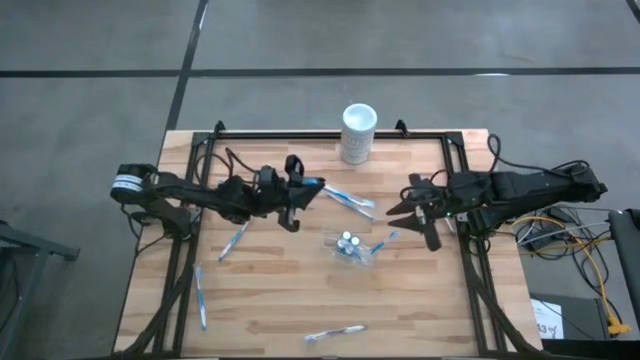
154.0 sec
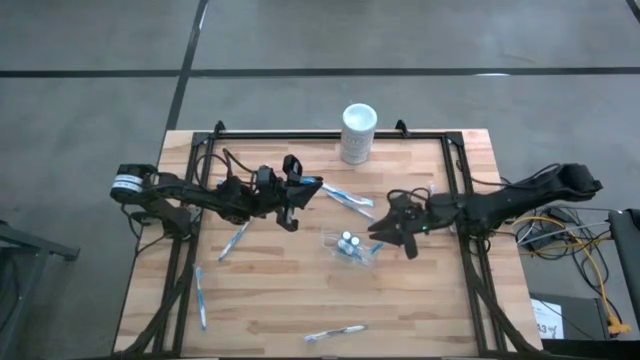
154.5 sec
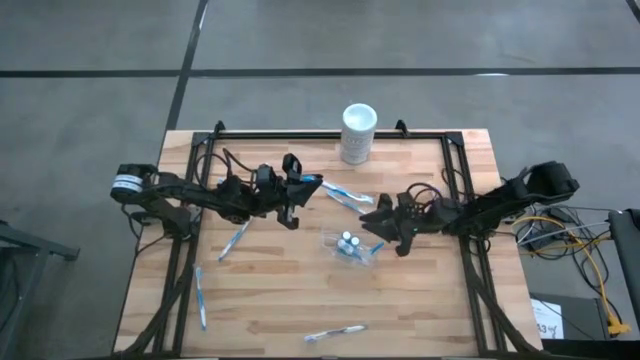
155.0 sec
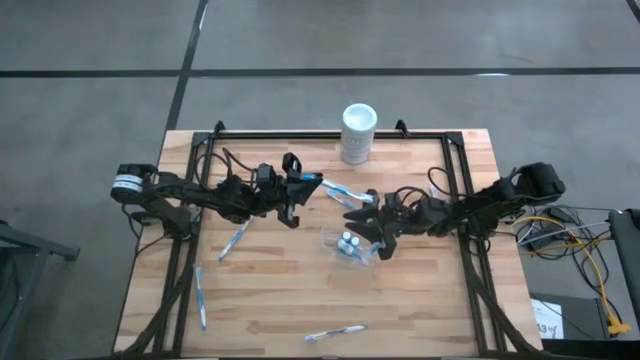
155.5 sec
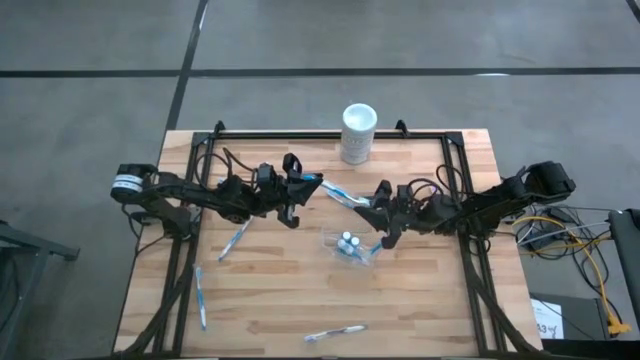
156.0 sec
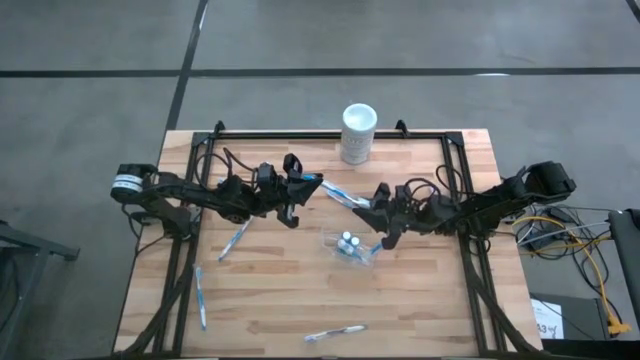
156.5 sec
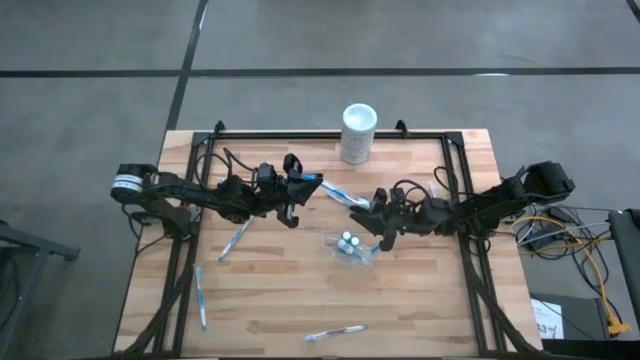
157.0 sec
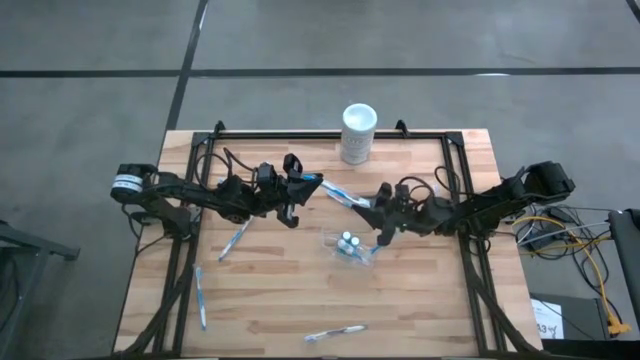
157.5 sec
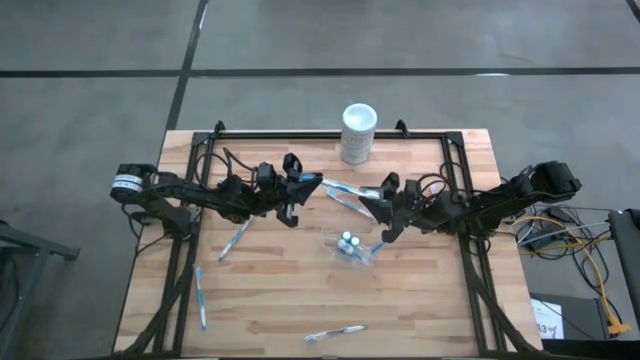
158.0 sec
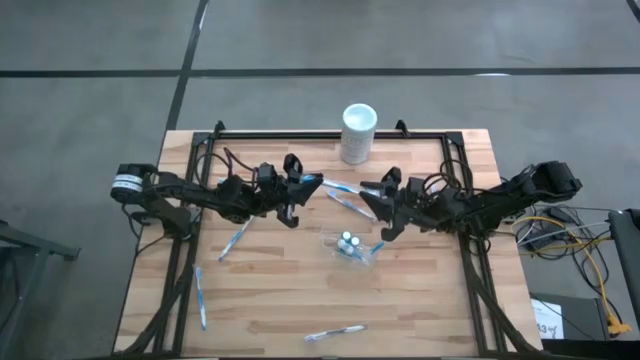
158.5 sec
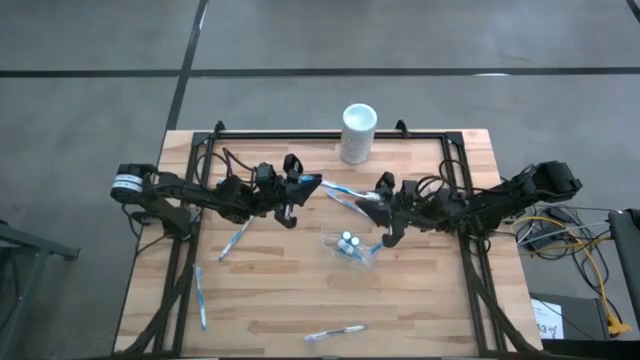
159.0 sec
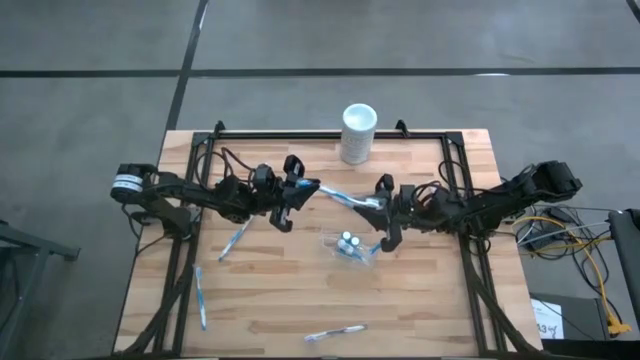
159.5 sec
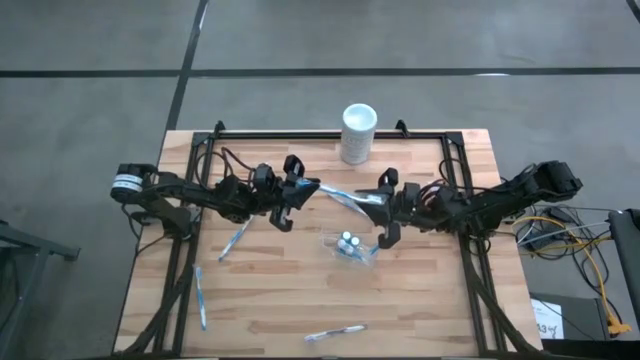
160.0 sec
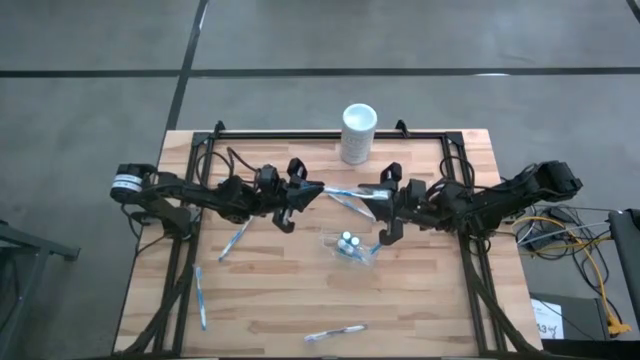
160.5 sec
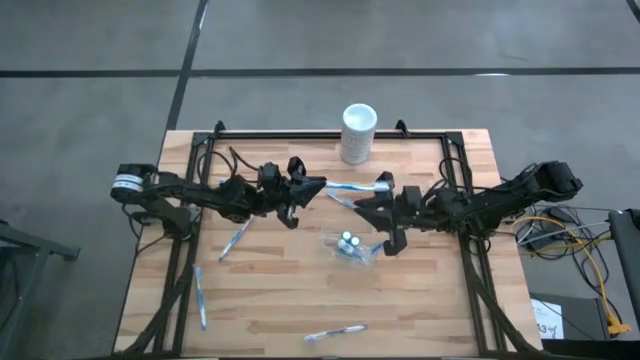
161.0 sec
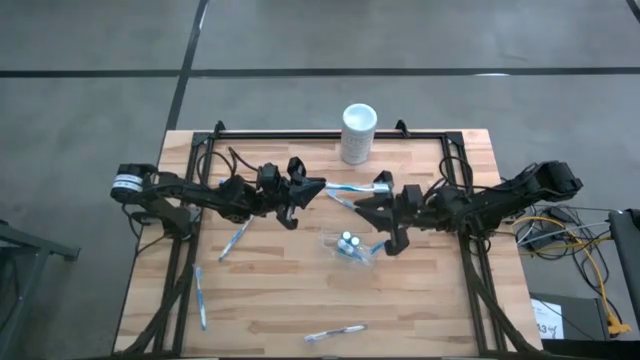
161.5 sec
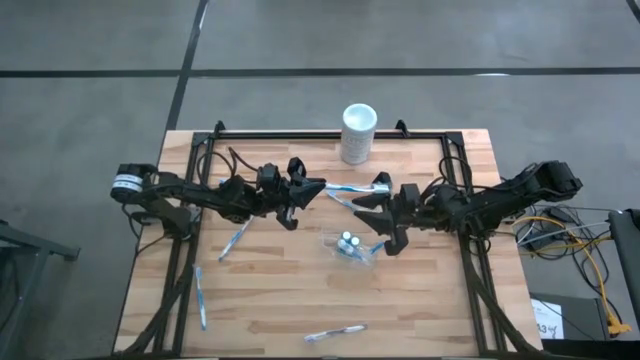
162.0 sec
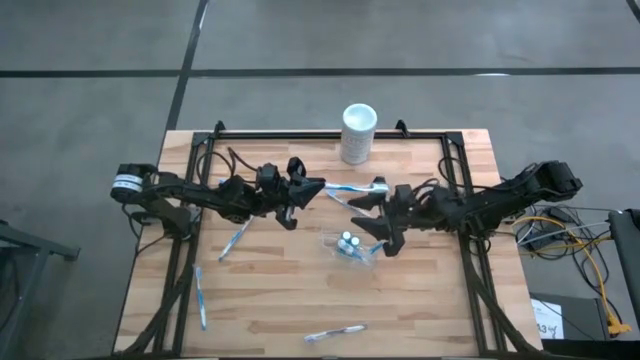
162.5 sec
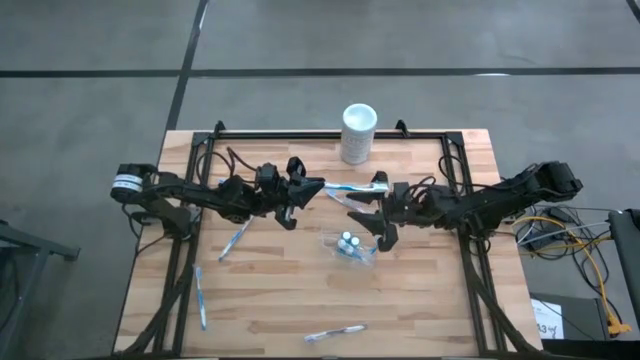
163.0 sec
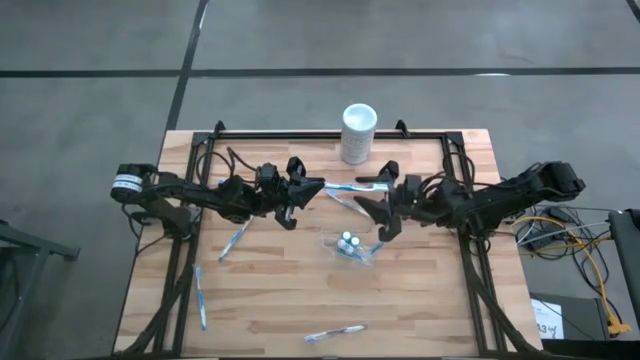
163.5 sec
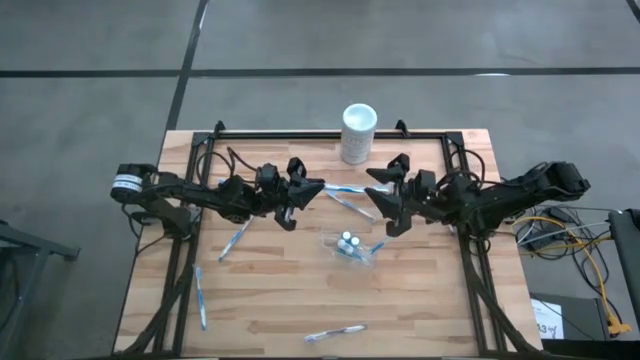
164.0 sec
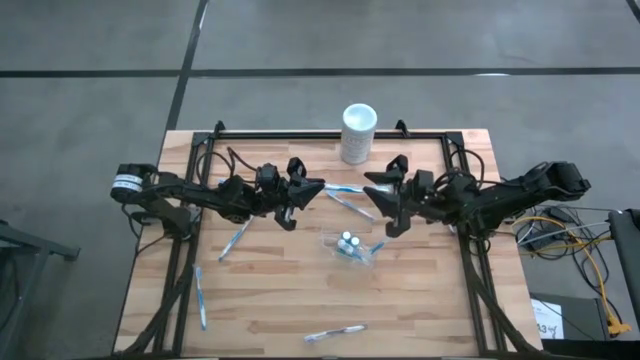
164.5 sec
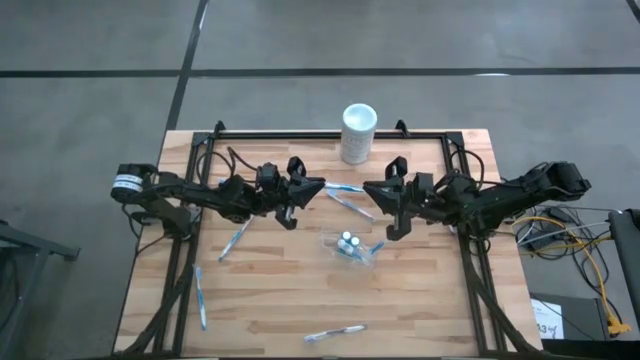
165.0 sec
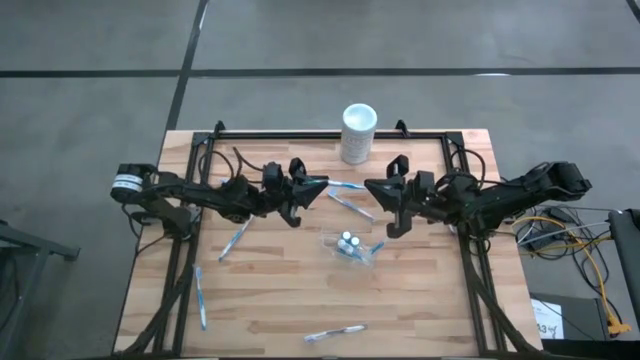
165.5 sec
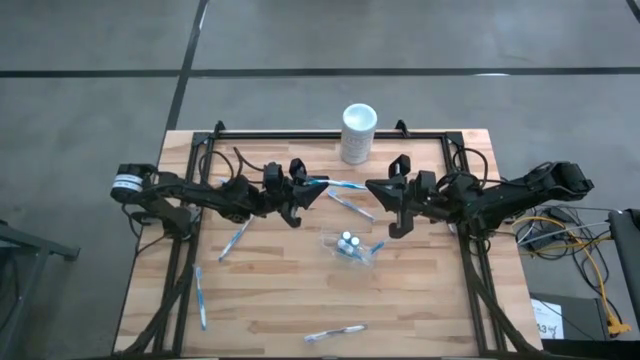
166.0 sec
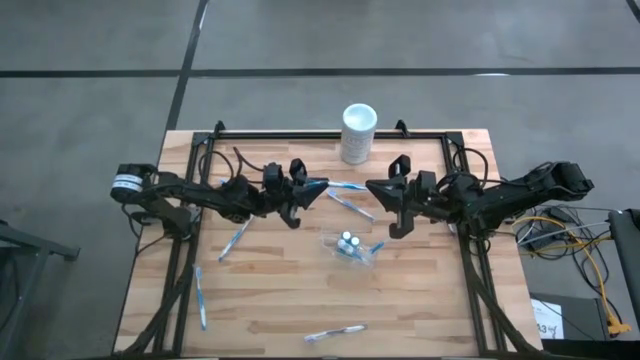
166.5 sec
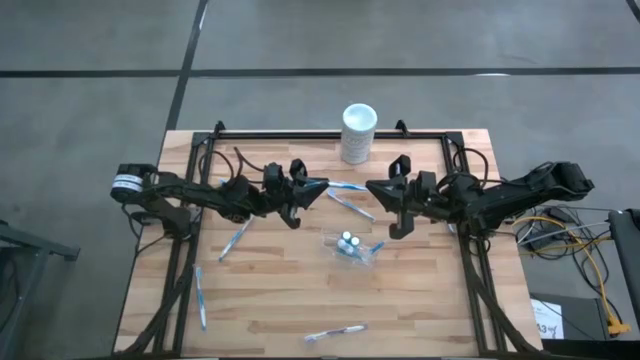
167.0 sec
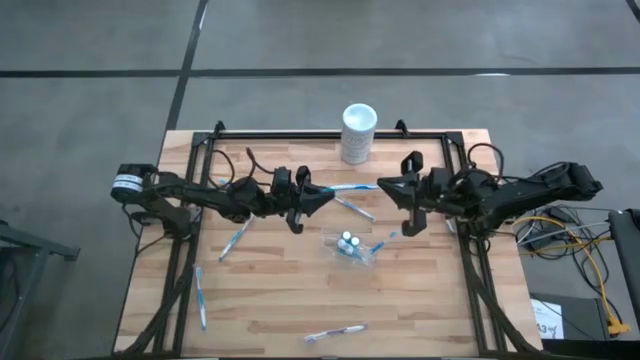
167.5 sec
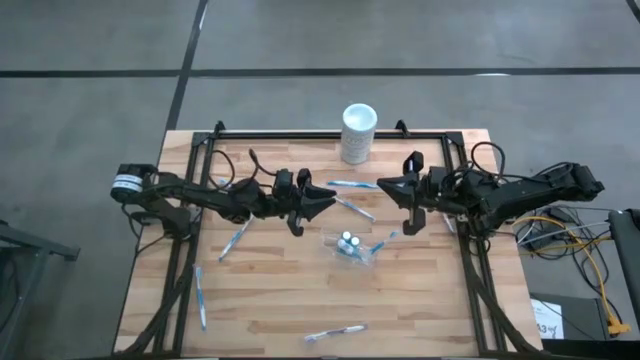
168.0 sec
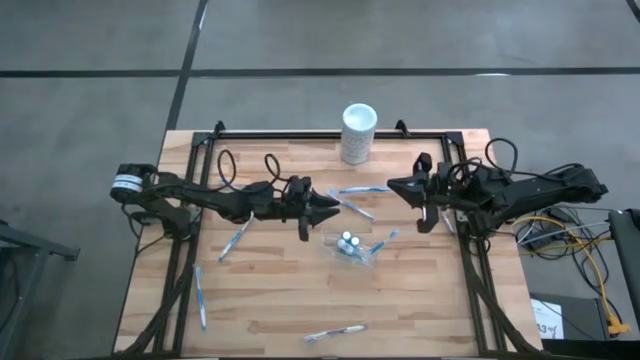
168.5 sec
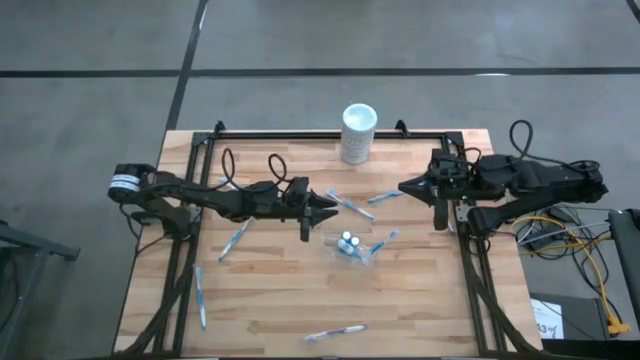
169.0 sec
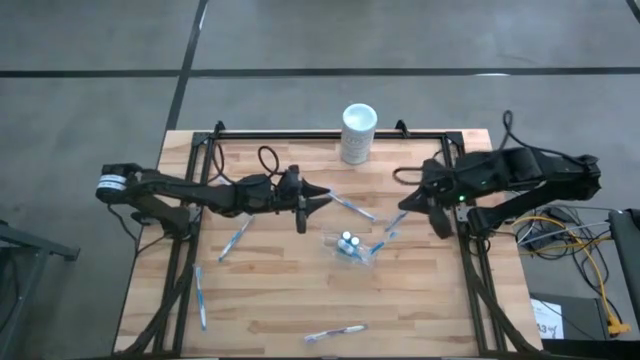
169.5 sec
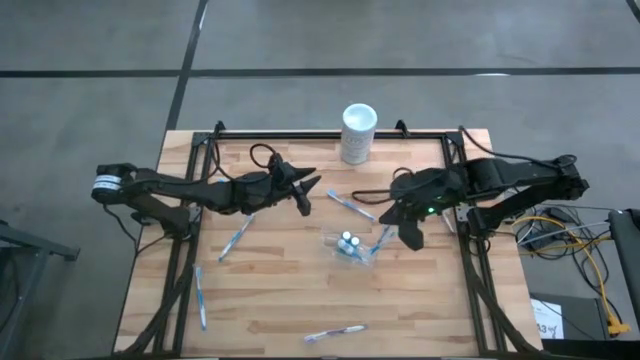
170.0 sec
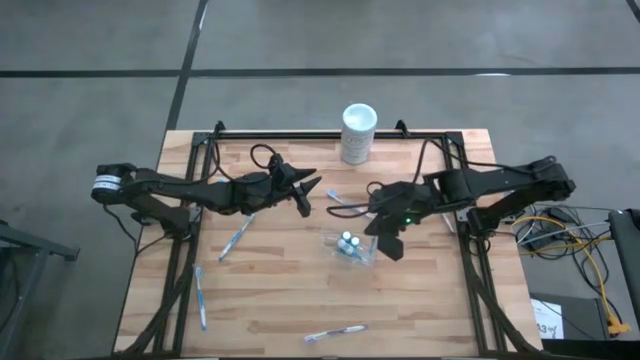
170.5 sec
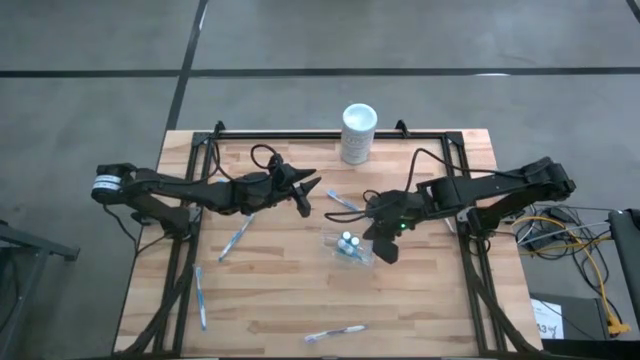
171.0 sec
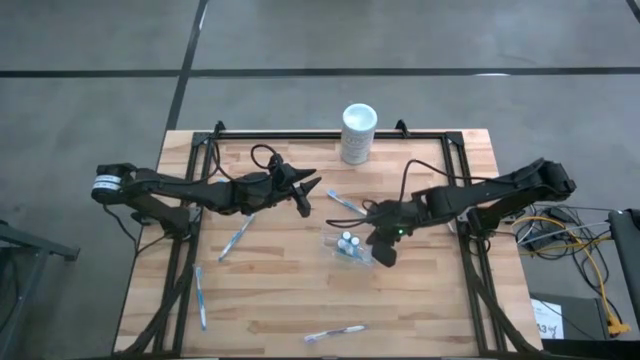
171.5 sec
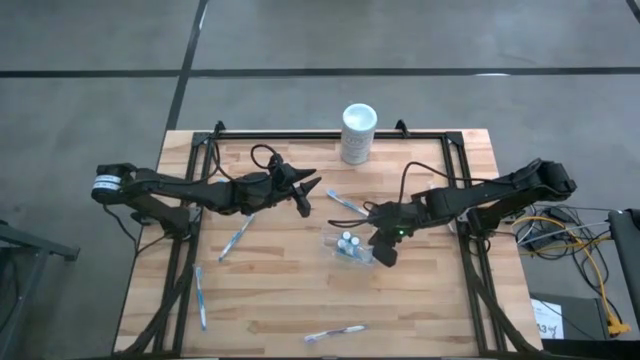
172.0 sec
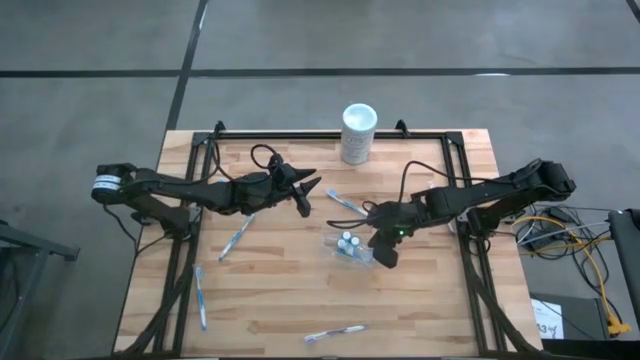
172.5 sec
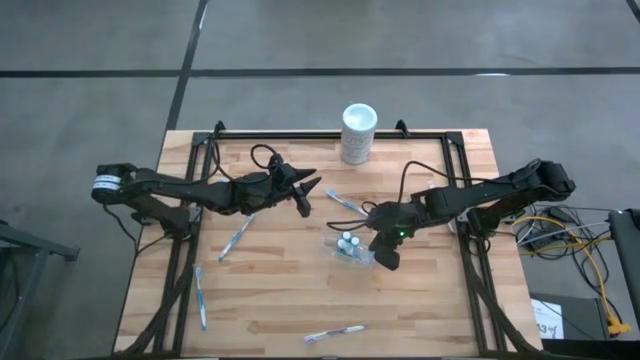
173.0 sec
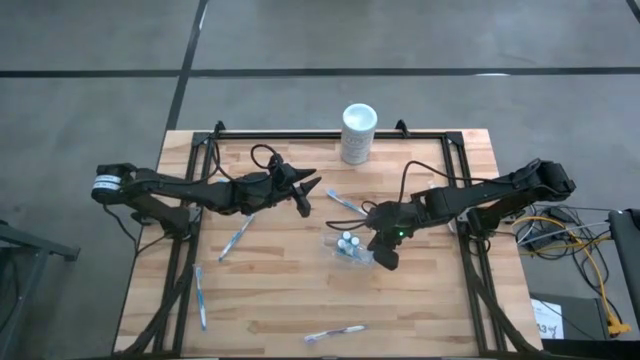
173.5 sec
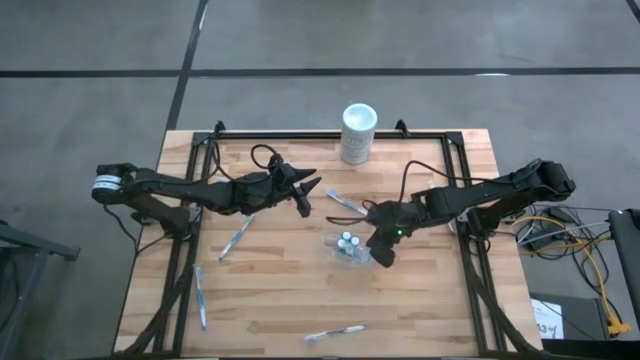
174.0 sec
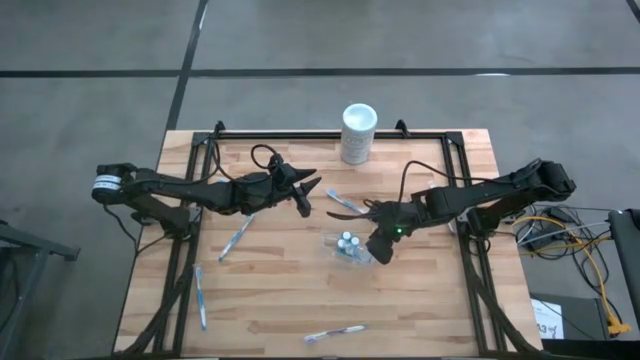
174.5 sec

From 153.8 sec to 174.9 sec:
Task: Pick & Place toothbrushing station
Put the blue toothbrush into the transparent organizer
